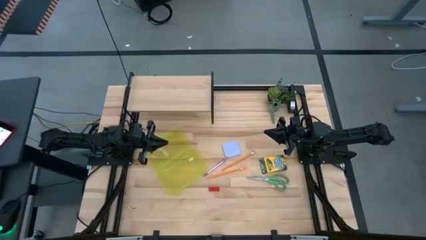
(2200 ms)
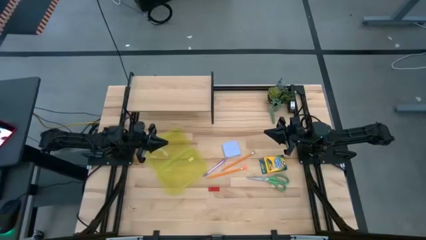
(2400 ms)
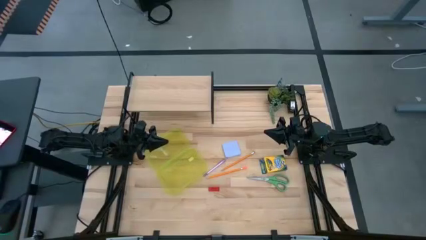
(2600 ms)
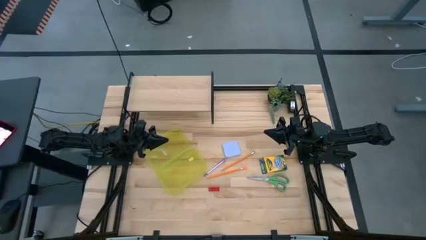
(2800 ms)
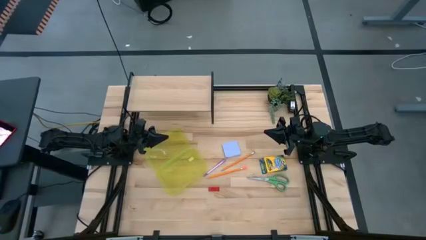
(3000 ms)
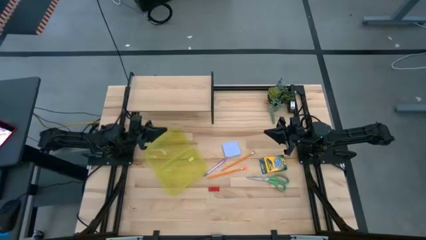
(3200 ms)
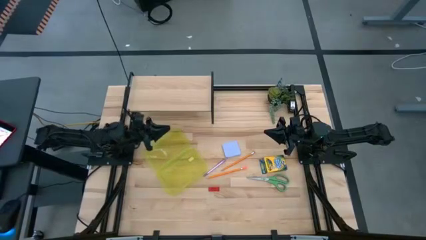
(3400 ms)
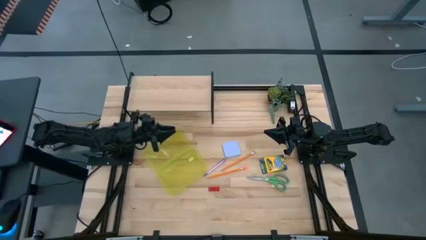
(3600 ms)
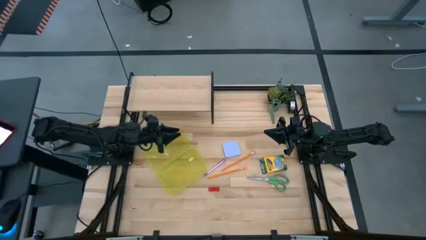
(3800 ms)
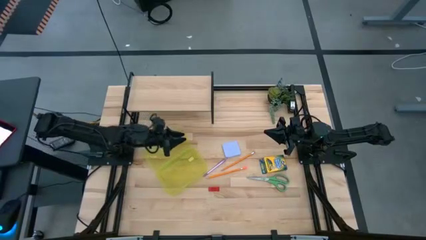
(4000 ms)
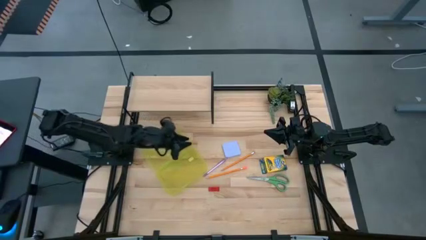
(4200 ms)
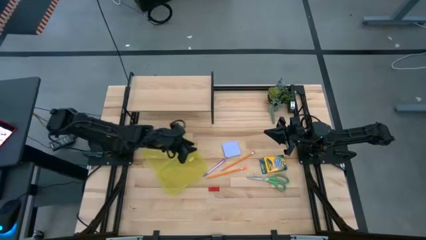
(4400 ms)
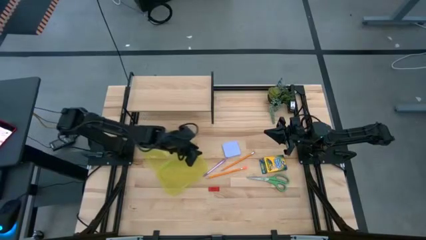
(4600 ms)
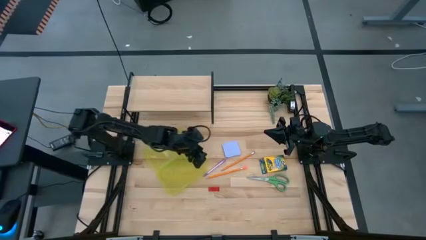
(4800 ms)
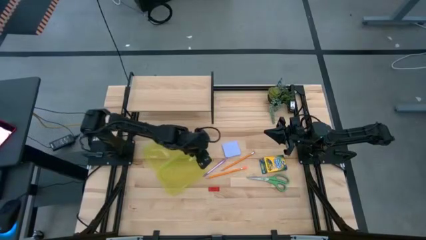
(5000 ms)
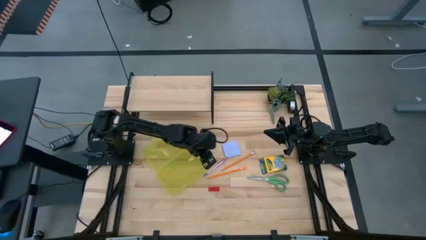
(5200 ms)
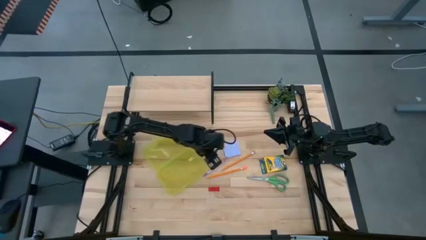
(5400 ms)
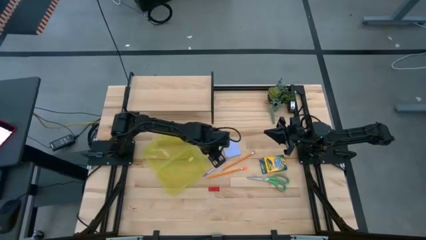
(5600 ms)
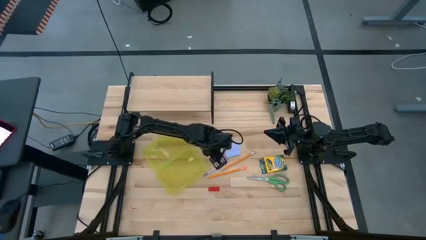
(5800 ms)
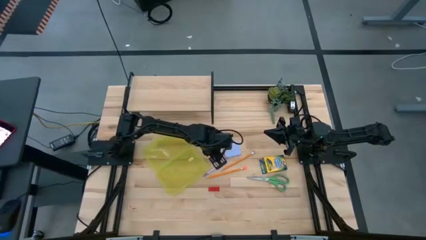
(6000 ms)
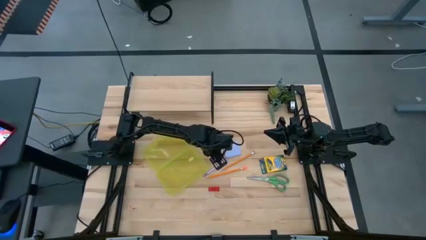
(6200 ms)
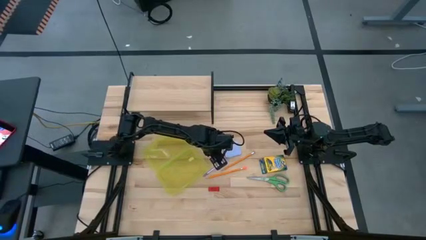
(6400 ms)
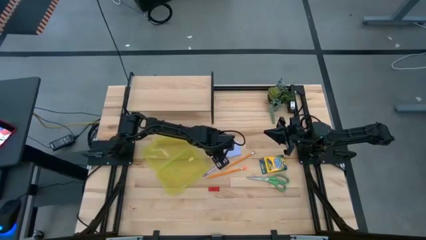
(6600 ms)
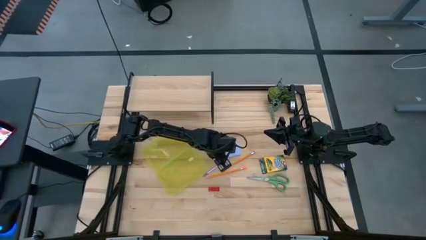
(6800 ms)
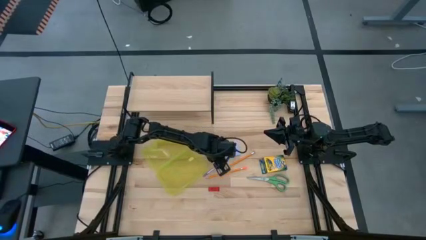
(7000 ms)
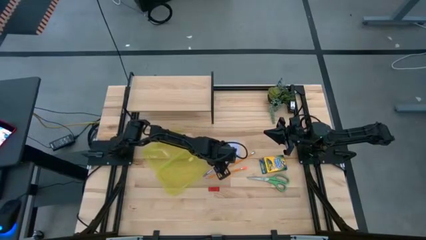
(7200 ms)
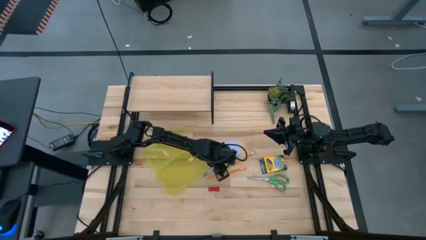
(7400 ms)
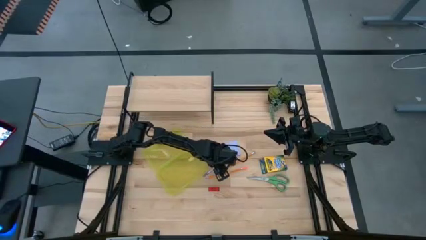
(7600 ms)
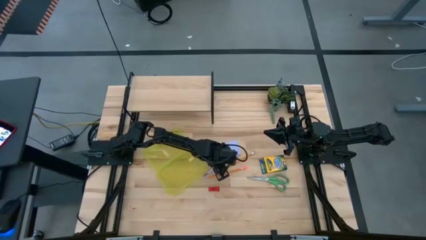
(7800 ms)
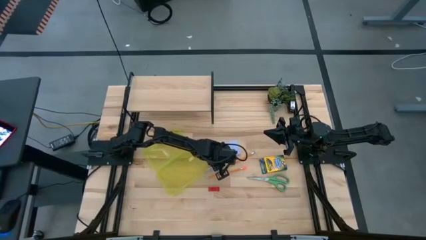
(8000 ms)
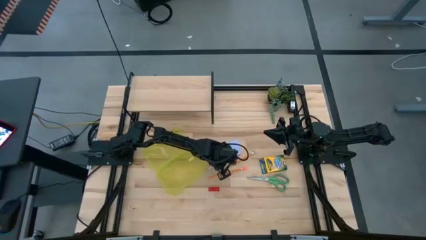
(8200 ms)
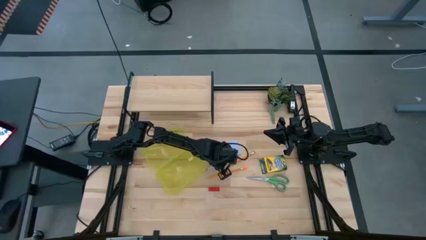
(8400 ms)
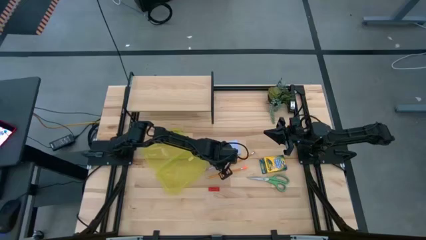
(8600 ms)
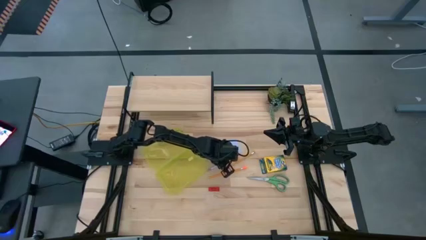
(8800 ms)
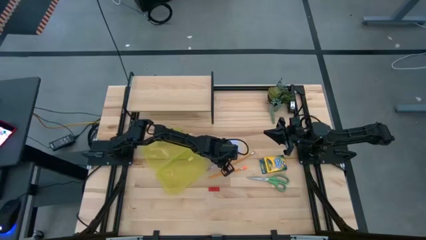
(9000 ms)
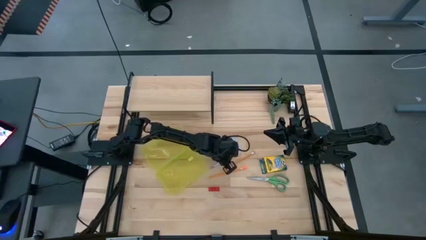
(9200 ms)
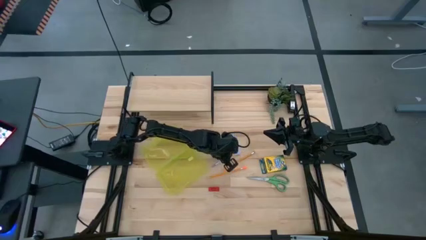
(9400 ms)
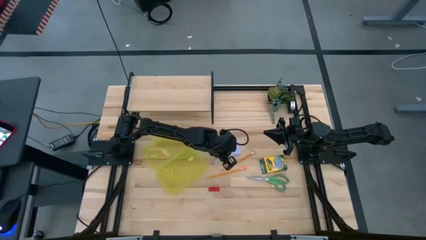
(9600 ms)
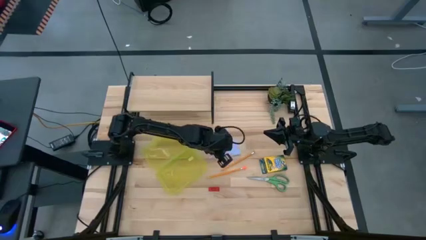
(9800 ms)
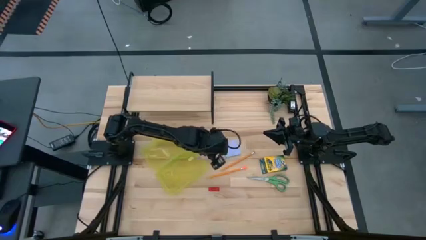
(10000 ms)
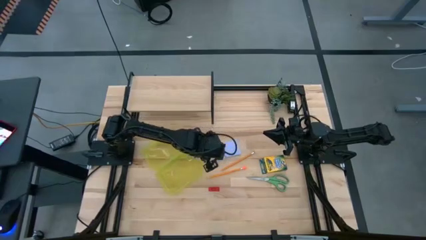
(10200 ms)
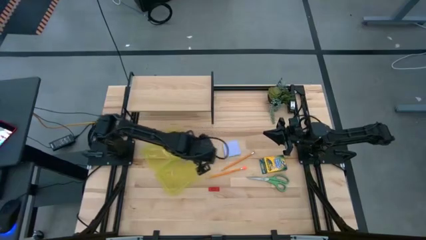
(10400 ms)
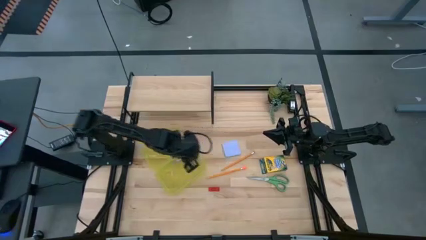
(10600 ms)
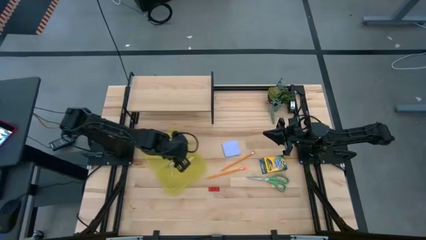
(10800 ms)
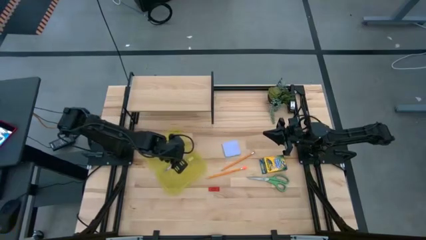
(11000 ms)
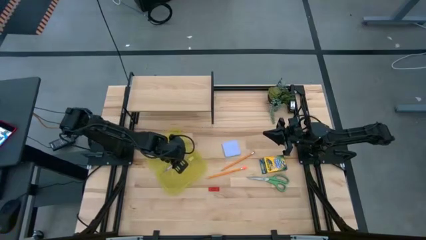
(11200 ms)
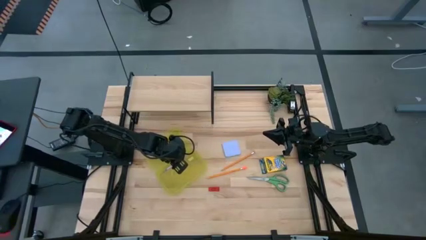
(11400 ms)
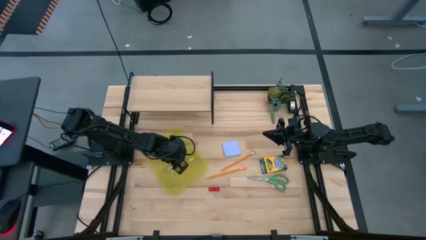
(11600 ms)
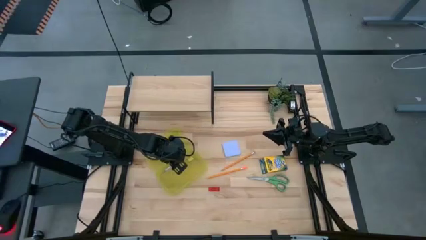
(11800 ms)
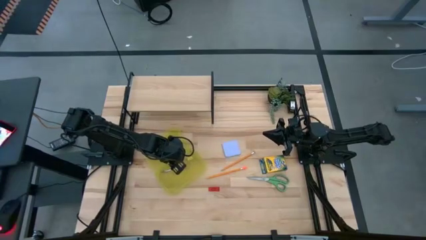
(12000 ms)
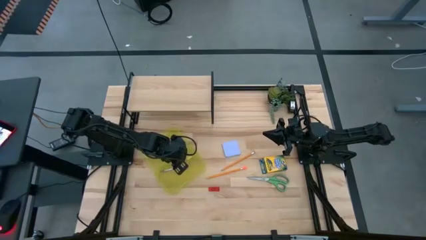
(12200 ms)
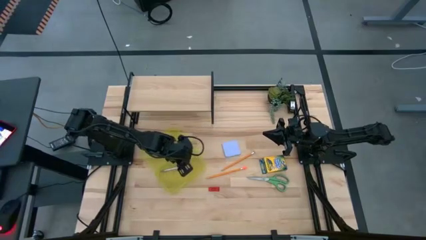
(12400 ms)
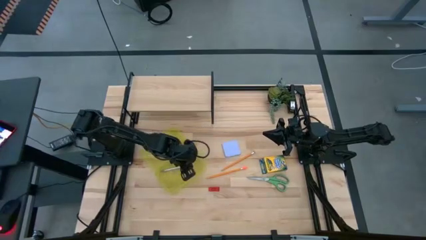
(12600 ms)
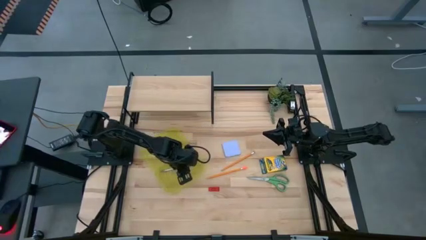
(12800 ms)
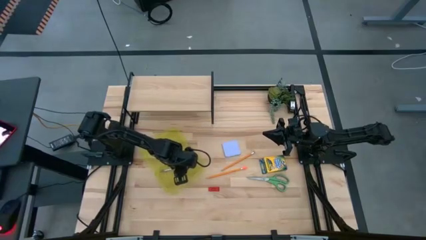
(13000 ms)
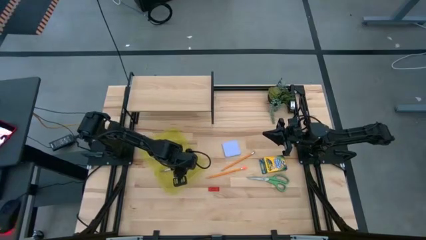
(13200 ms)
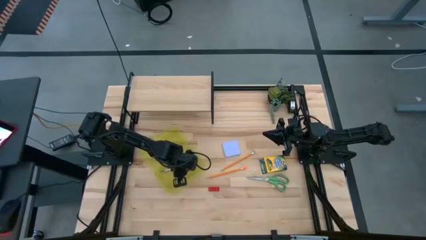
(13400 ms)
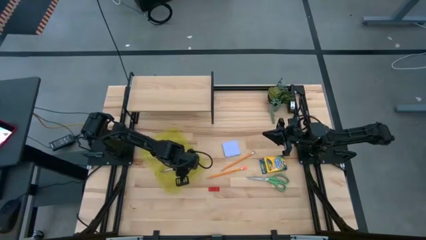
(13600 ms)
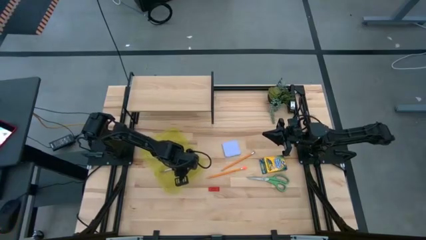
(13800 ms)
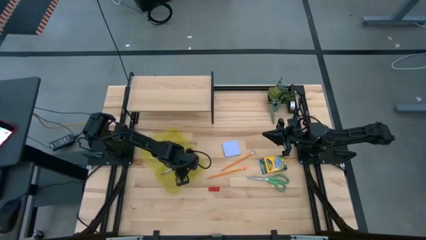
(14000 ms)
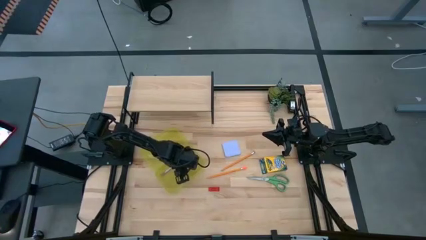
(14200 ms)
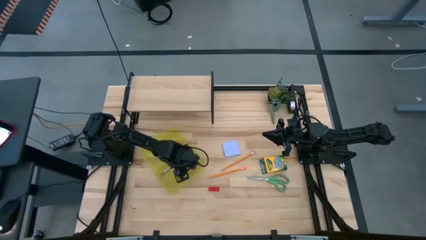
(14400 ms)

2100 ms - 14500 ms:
Task: Pack school essentials
Put the pink pen into the yellow supply box

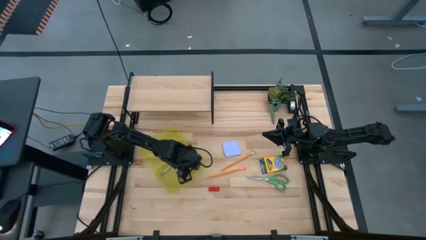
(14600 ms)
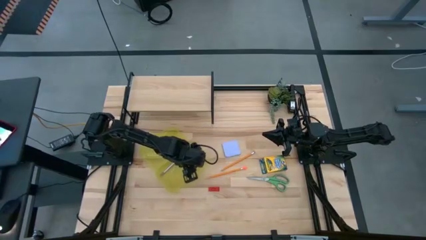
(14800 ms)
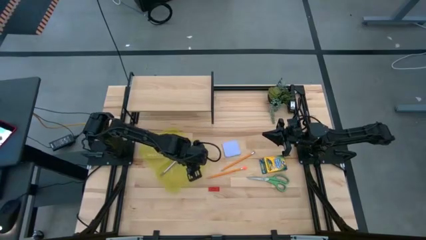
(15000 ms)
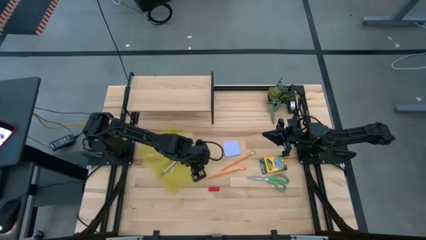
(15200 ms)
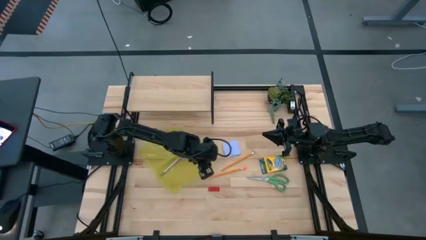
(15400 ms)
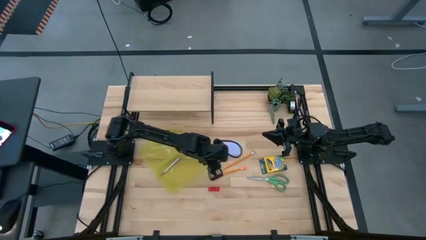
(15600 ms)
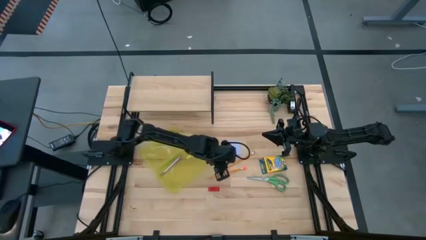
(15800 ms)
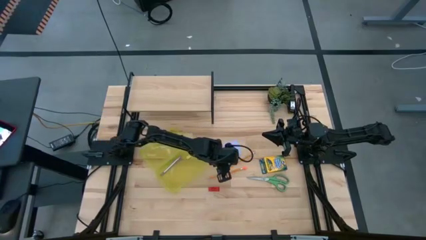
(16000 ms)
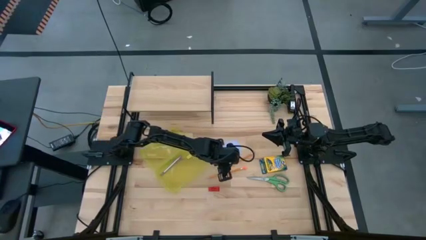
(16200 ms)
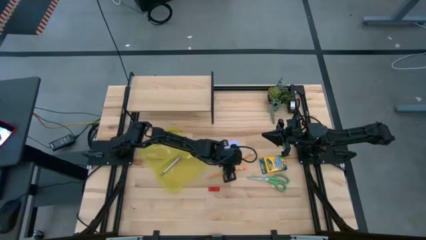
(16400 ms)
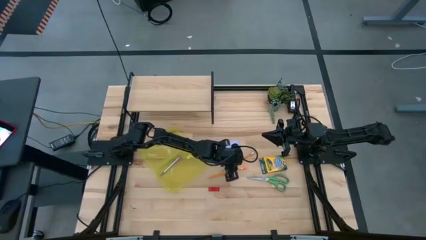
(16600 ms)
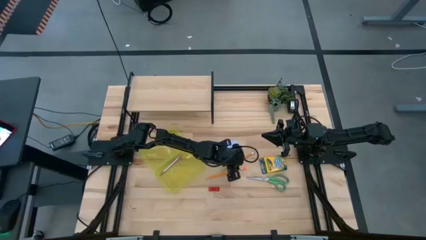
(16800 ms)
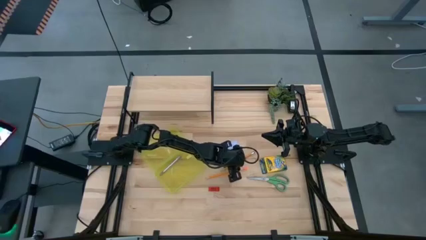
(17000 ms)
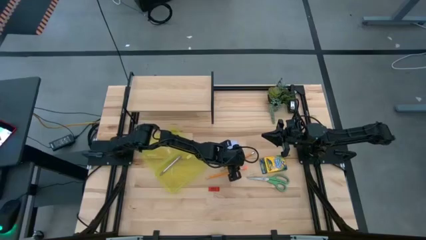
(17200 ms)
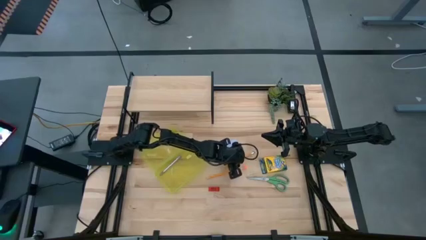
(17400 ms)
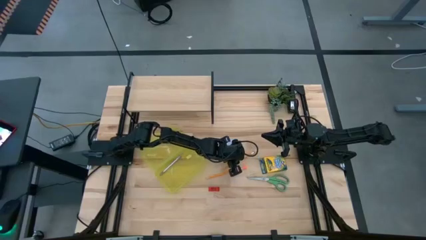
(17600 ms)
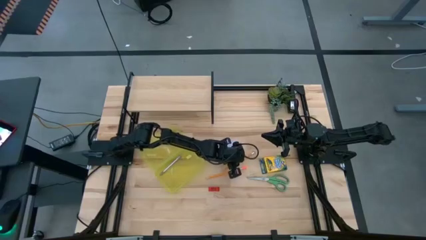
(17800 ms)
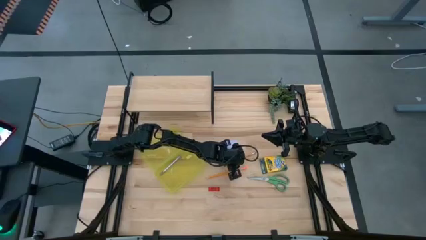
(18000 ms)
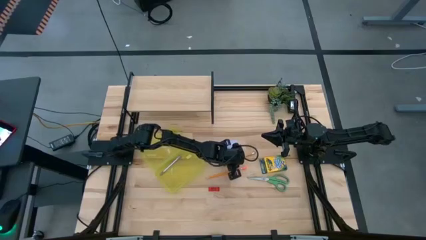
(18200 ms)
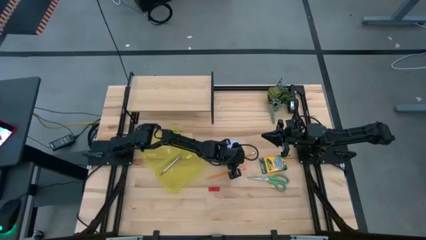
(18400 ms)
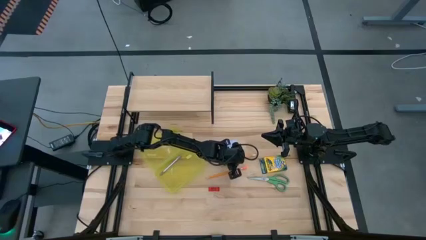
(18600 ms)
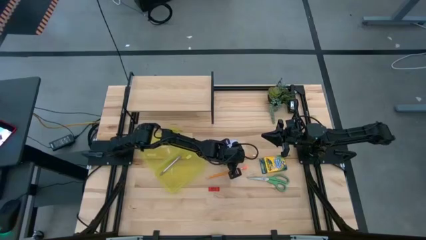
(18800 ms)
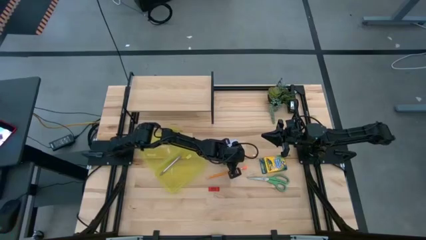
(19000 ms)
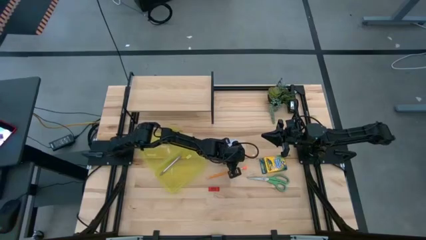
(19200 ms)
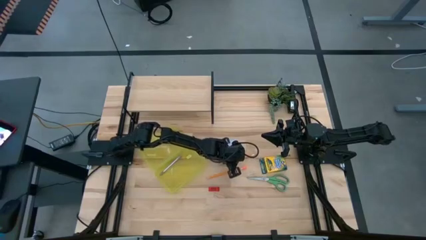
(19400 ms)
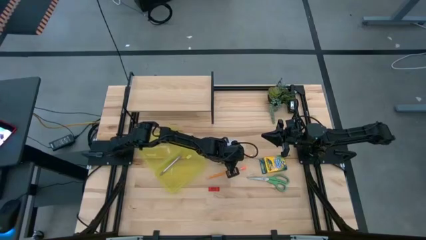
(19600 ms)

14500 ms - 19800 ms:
Put the top orange pencil into the yellow supply box
